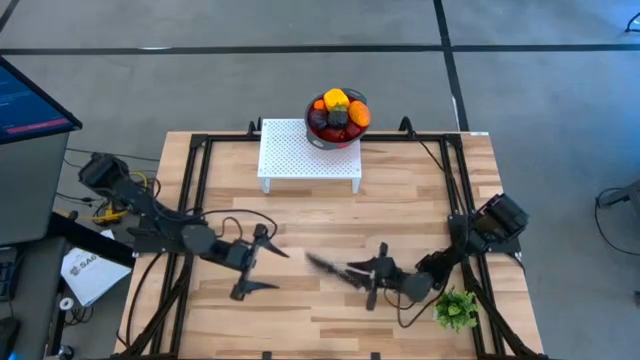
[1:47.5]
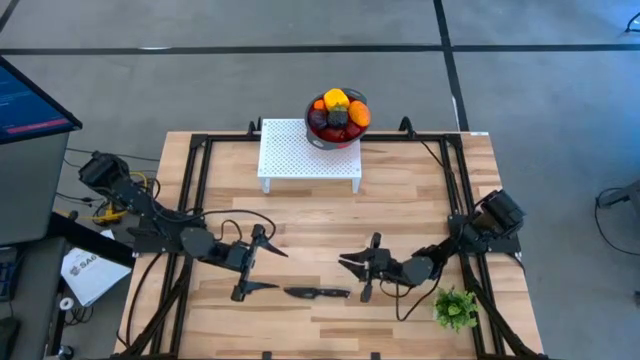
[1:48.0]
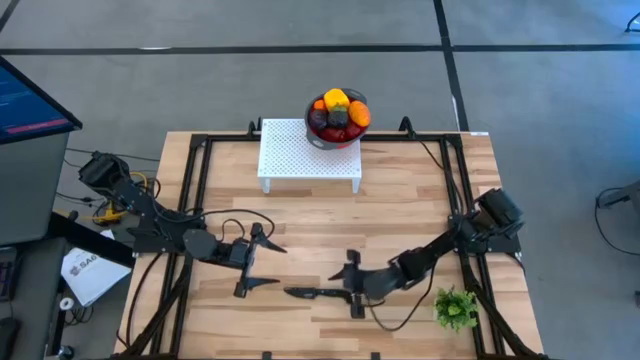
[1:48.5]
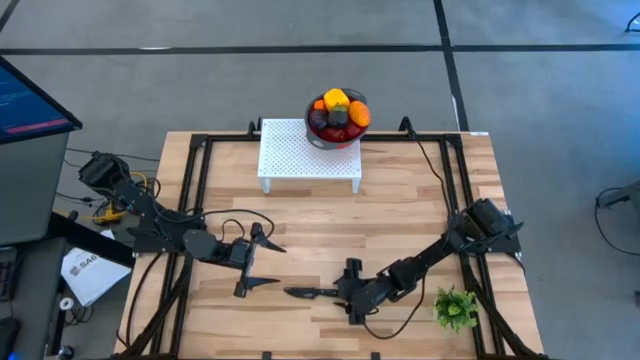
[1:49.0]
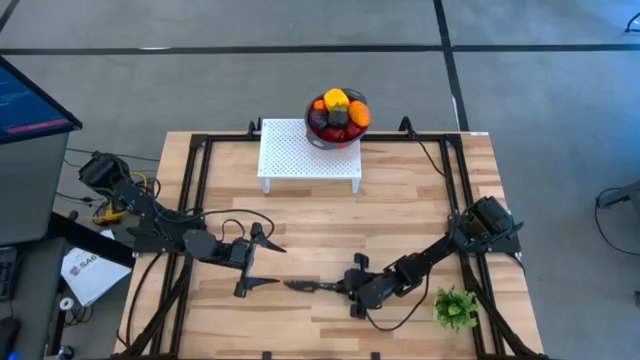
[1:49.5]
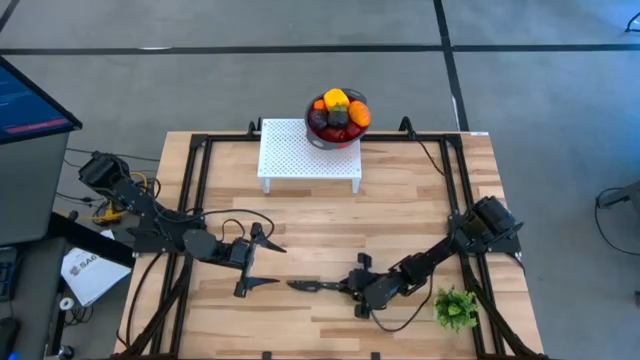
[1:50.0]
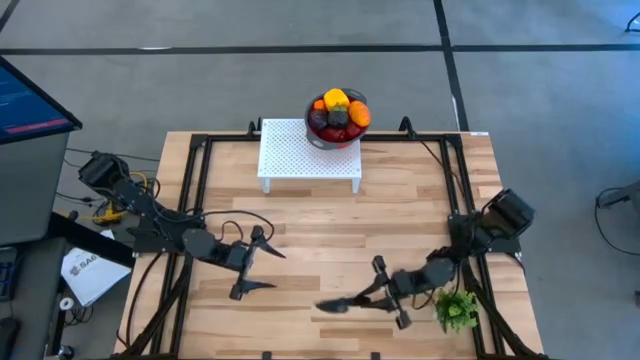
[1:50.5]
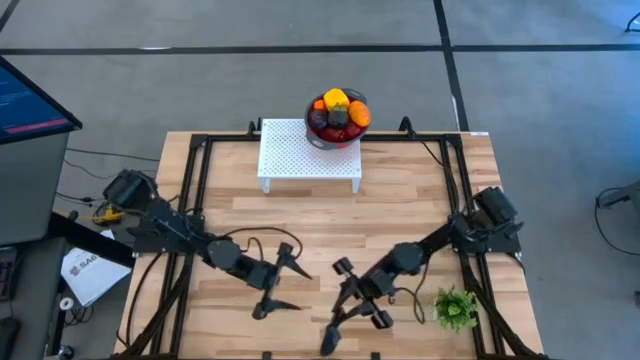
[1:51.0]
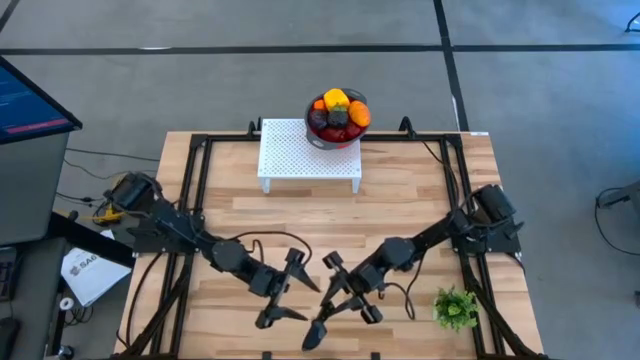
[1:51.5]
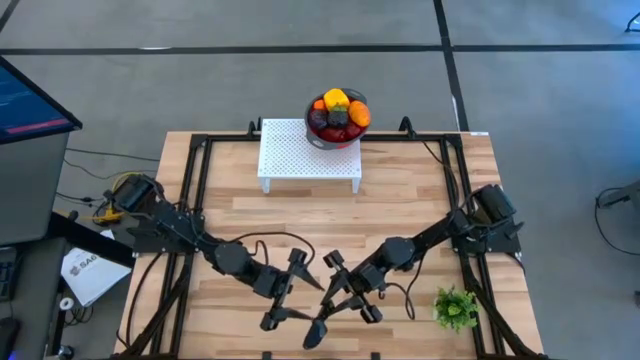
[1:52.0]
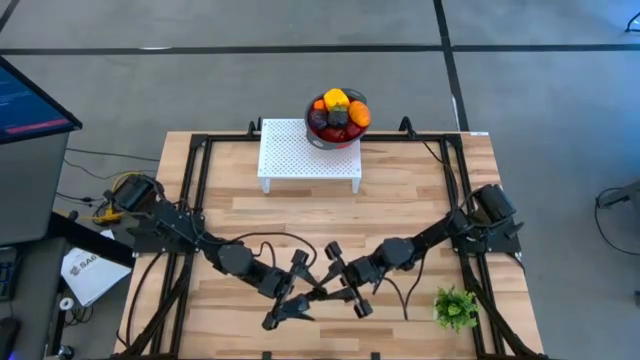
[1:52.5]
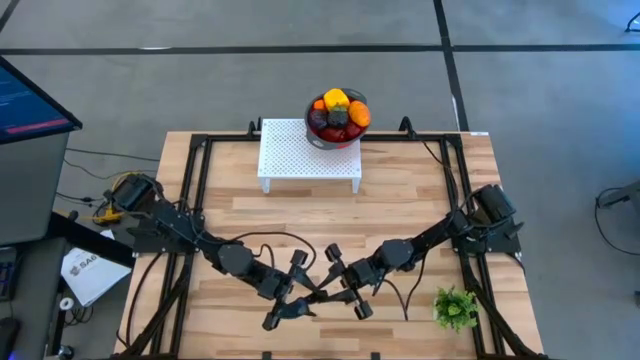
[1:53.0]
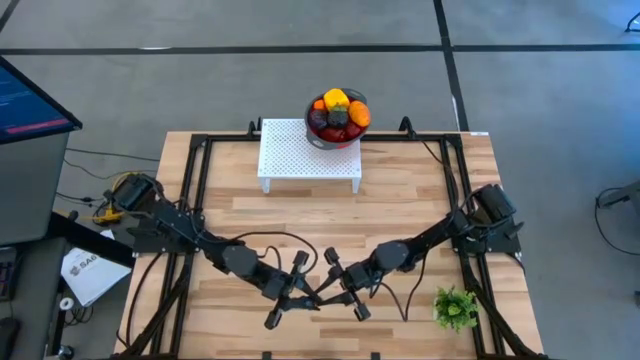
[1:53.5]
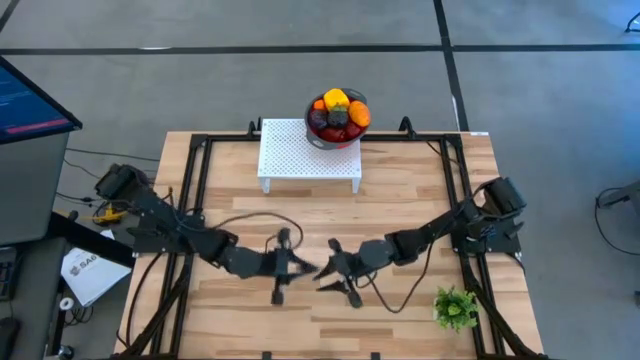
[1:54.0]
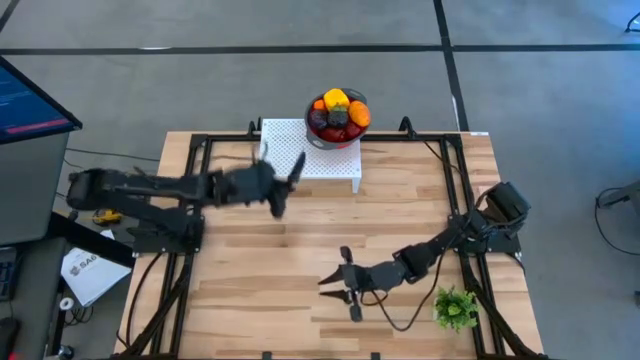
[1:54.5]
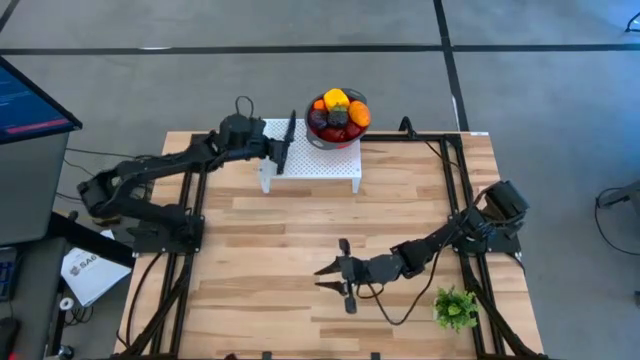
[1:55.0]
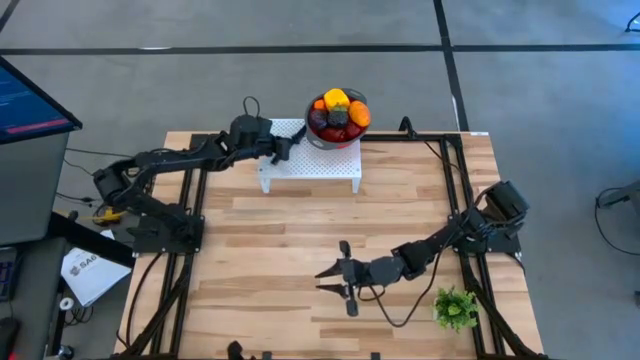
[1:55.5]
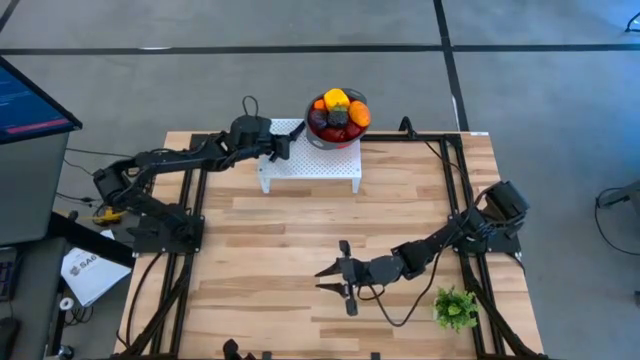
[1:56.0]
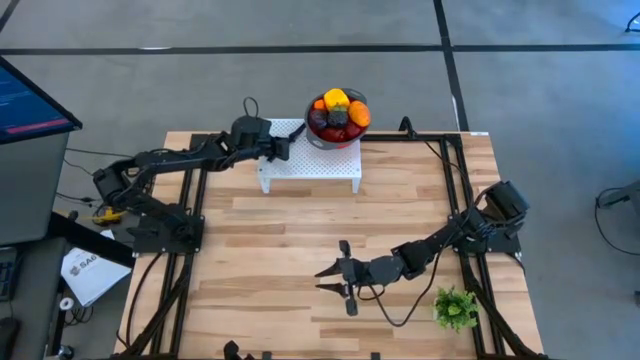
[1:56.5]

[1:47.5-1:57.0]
Task: Pick & Place Fruit
Put the black knife on the shelf

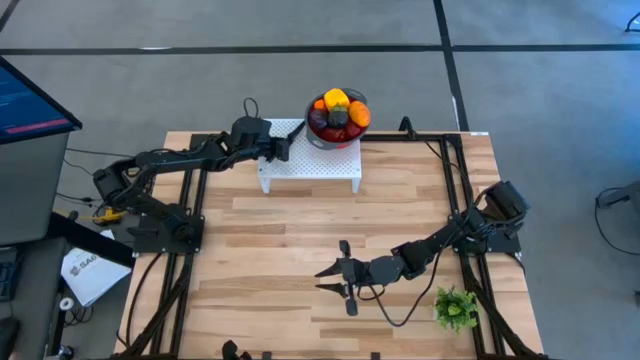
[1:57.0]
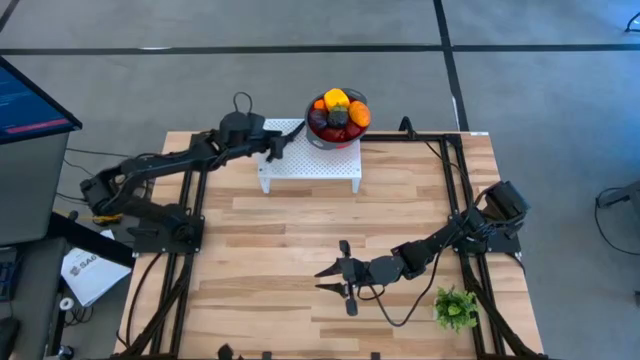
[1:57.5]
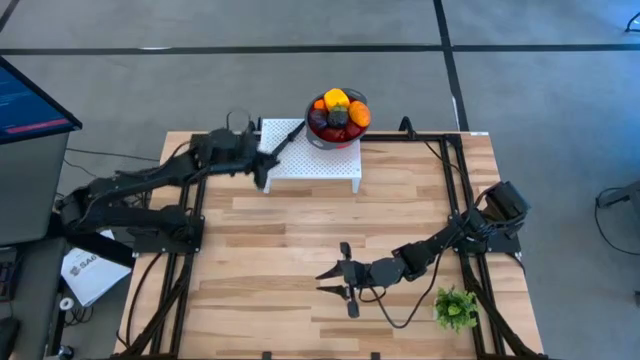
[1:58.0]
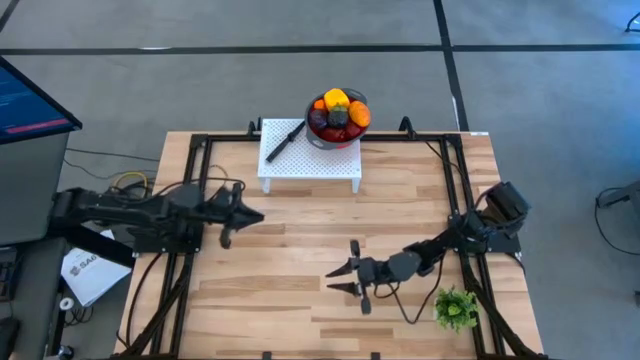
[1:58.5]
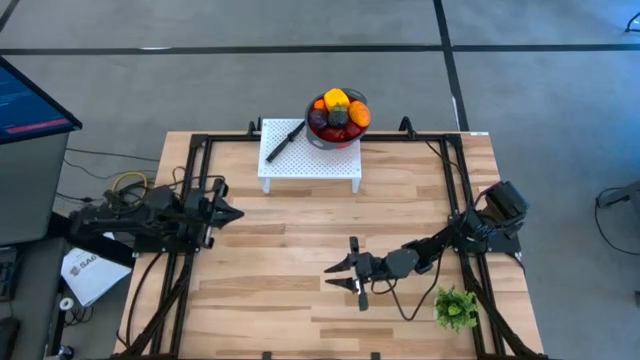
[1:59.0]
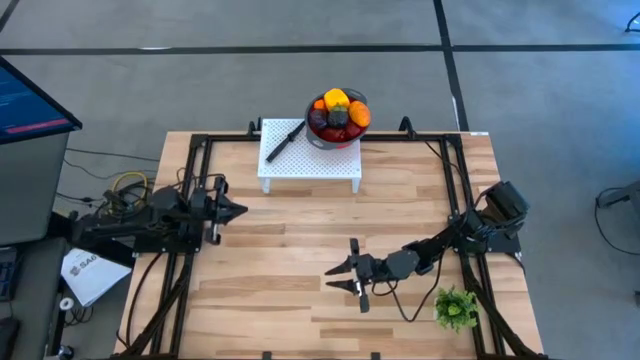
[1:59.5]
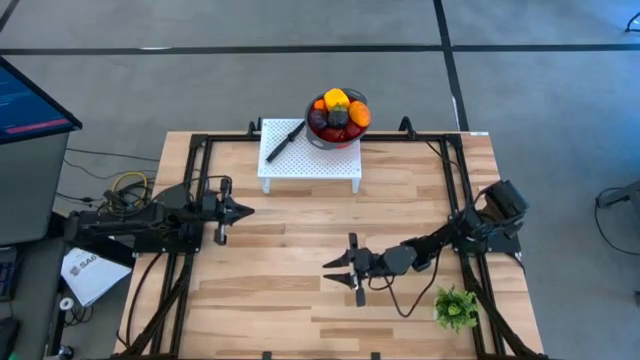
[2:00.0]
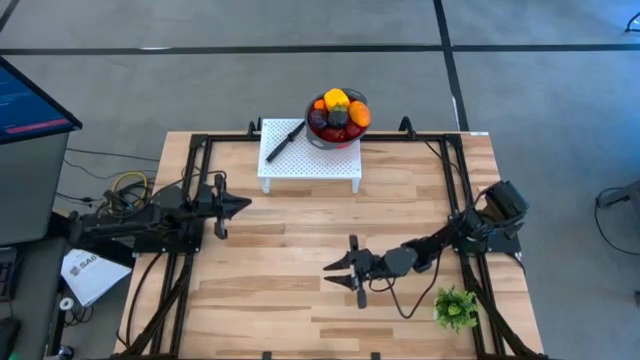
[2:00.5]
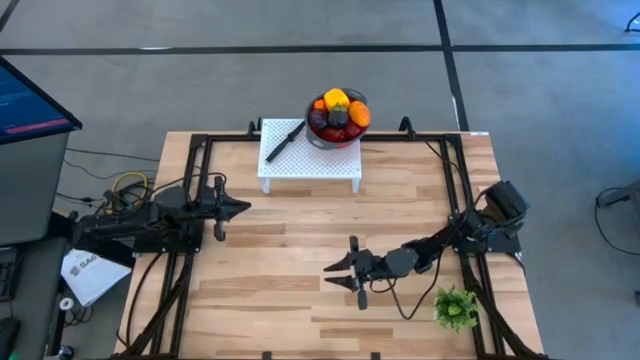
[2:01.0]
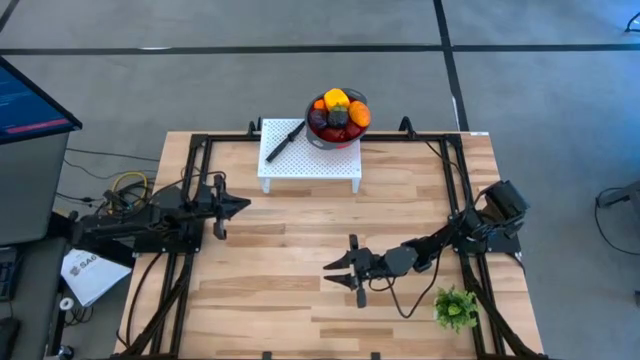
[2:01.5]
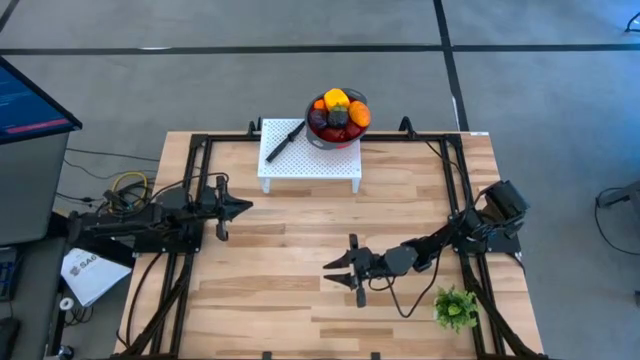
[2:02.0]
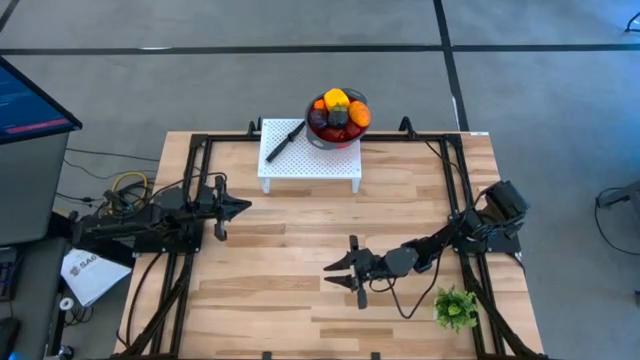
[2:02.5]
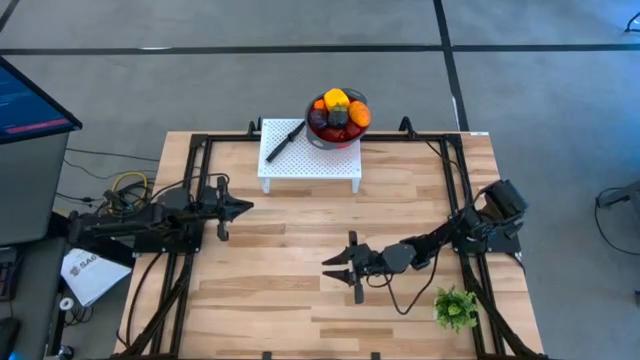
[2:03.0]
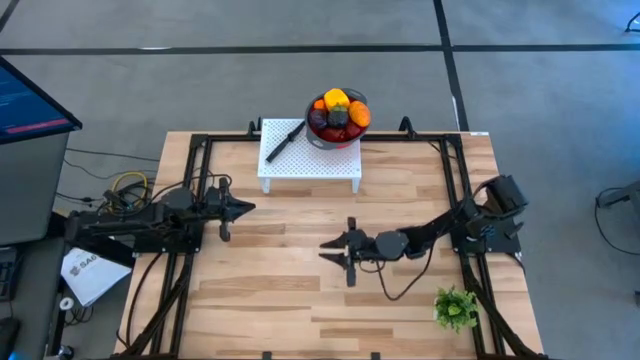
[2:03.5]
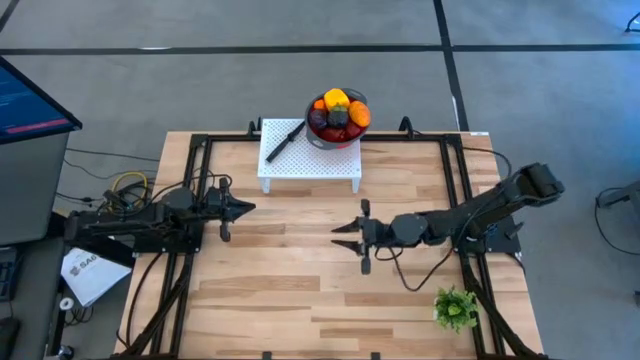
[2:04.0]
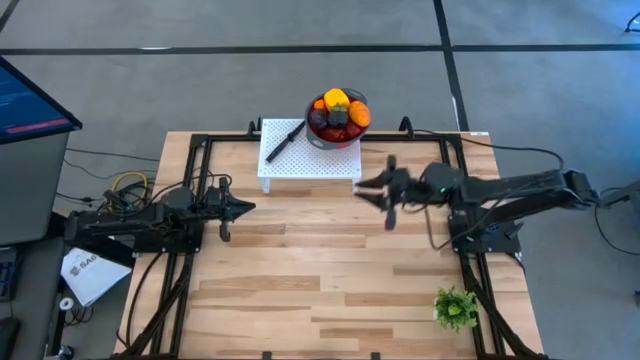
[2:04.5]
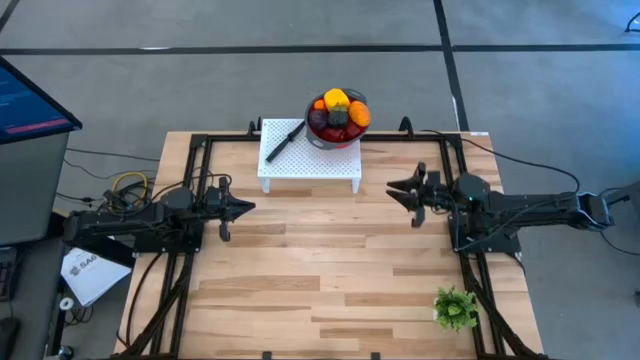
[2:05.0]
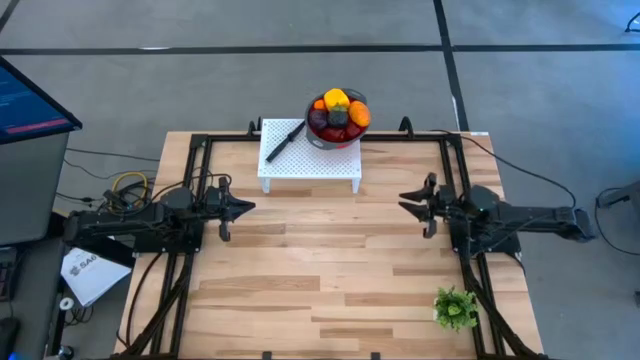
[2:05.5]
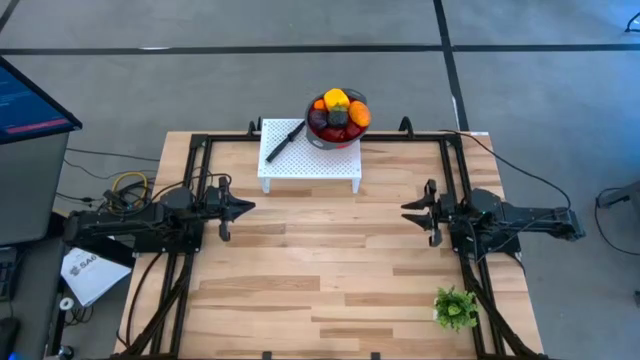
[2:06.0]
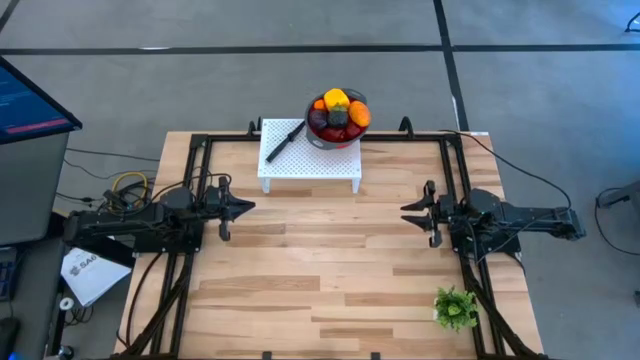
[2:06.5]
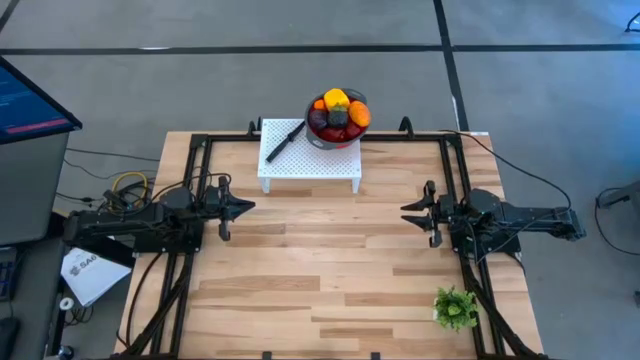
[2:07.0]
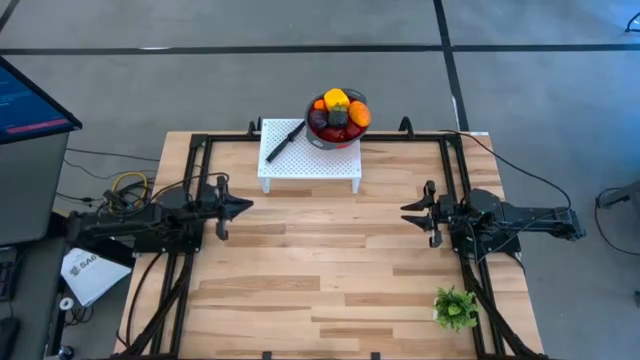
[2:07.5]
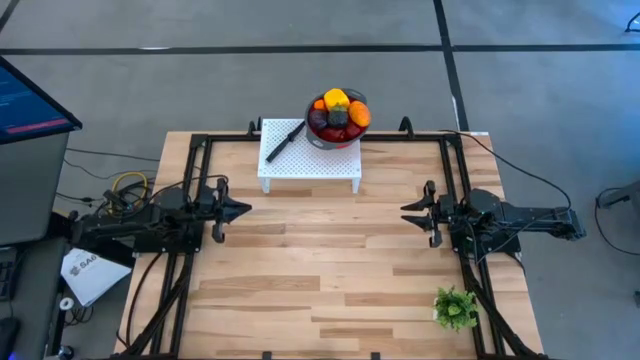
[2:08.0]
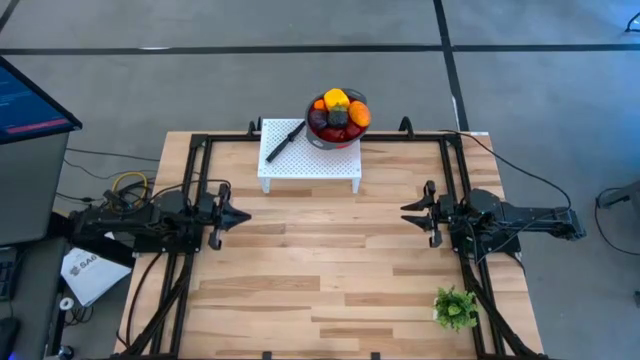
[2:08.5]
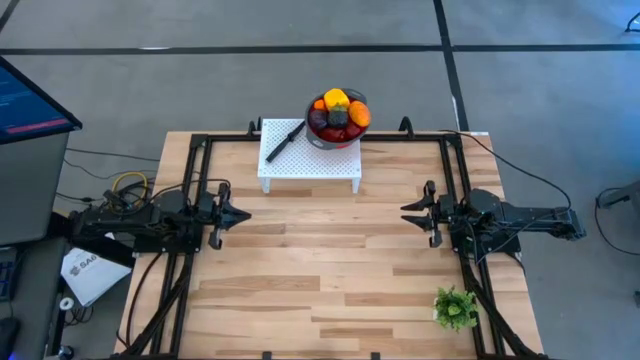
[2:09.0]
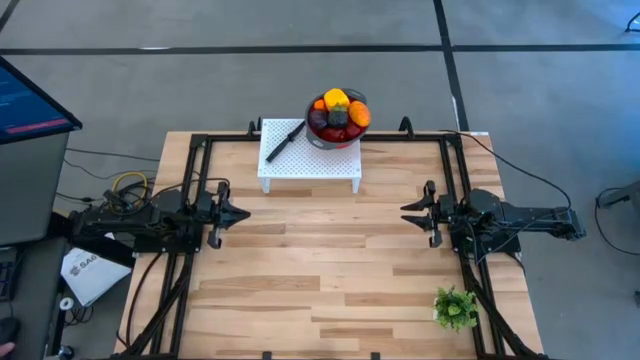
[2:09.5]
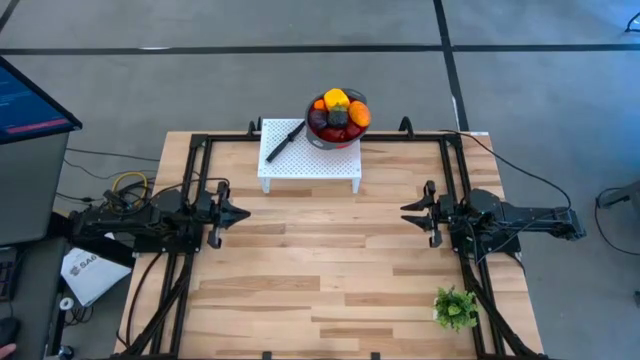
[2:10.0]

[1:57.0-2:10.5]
Return to Home Position
